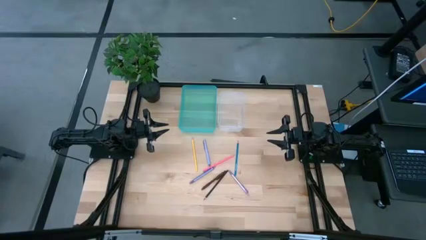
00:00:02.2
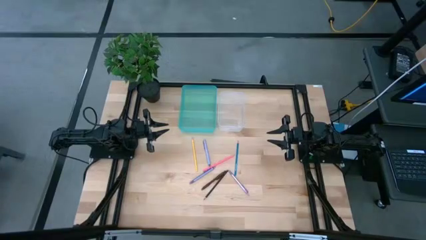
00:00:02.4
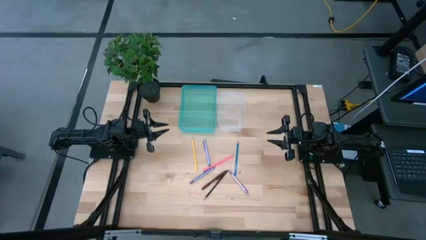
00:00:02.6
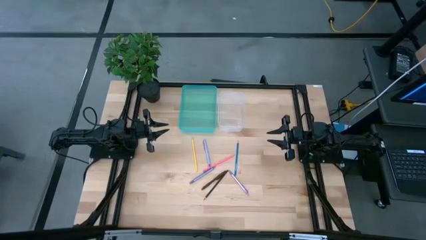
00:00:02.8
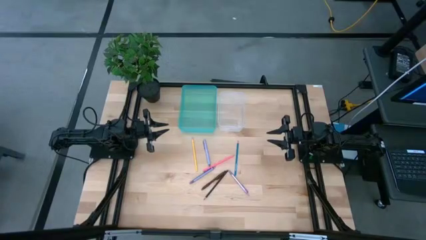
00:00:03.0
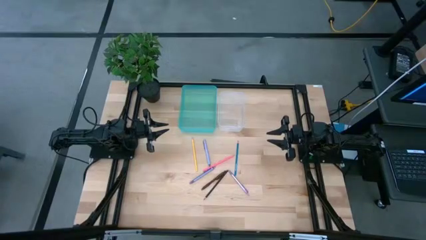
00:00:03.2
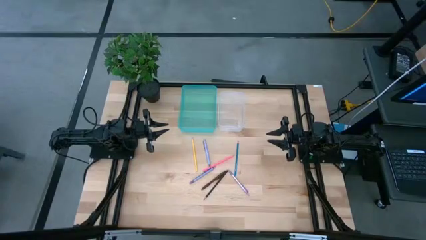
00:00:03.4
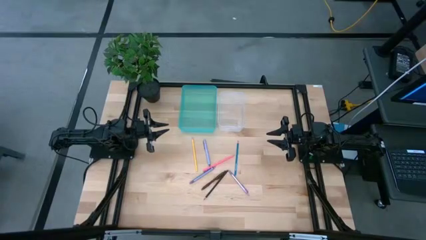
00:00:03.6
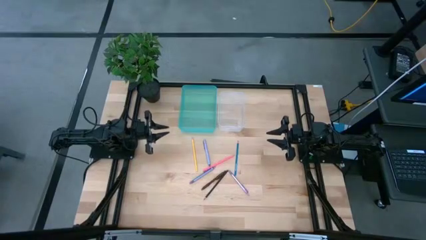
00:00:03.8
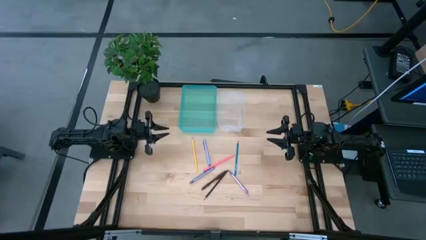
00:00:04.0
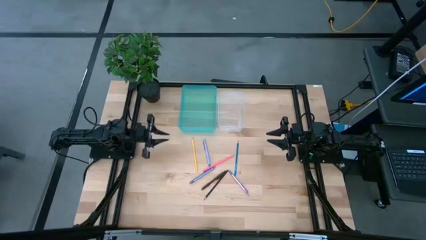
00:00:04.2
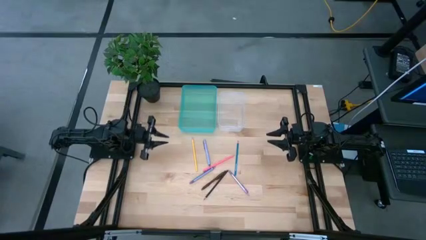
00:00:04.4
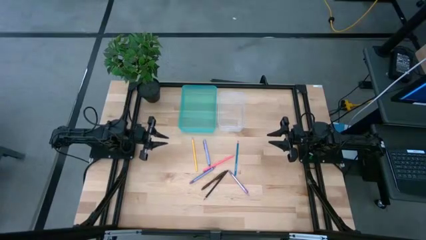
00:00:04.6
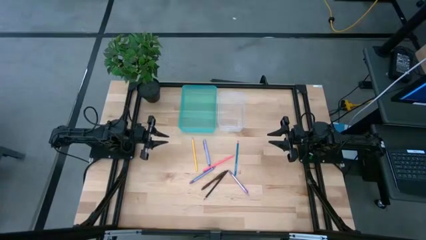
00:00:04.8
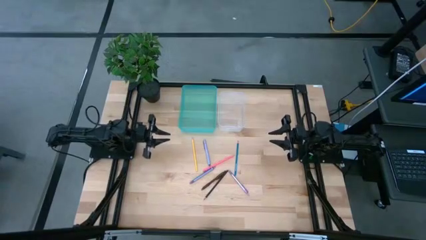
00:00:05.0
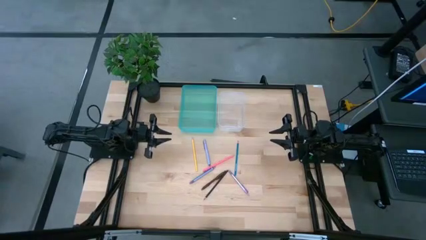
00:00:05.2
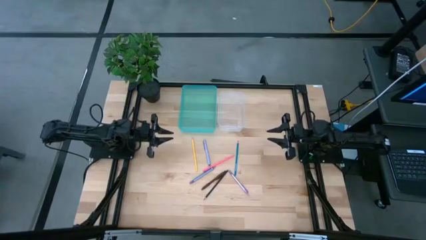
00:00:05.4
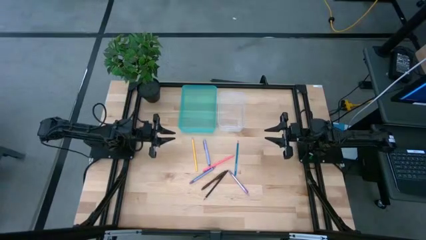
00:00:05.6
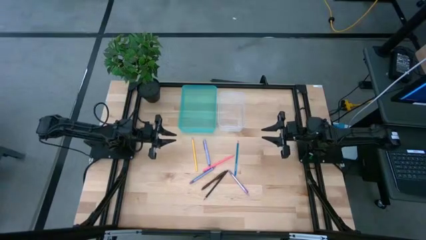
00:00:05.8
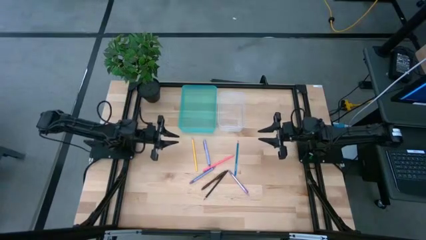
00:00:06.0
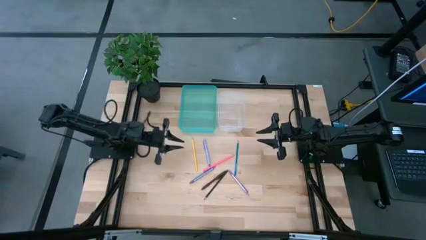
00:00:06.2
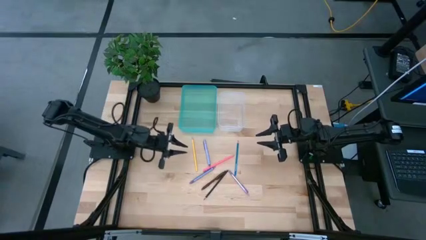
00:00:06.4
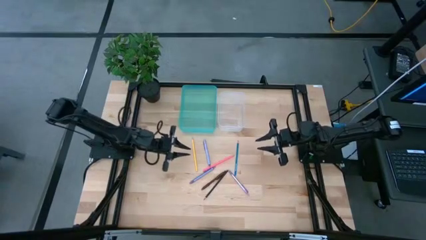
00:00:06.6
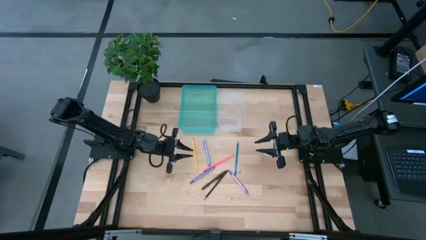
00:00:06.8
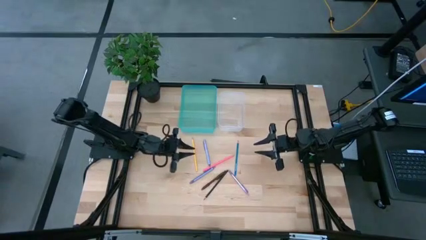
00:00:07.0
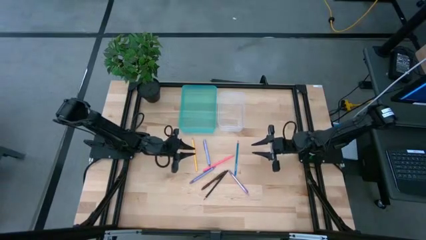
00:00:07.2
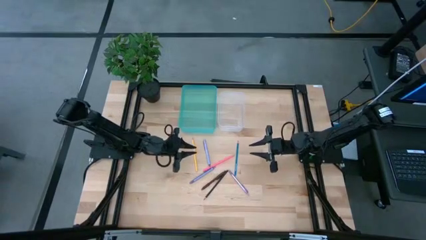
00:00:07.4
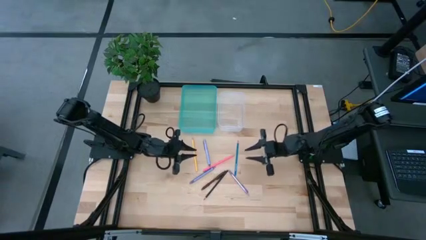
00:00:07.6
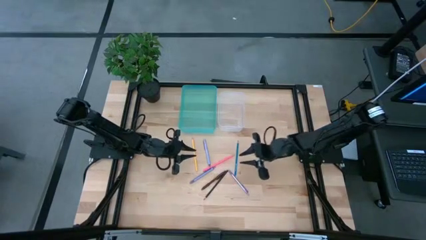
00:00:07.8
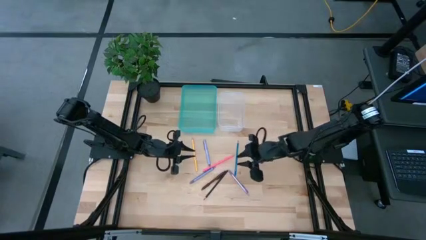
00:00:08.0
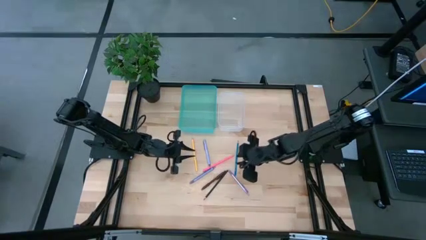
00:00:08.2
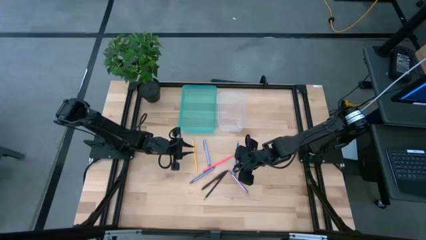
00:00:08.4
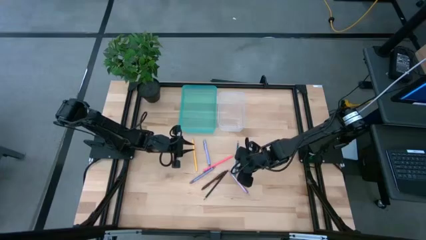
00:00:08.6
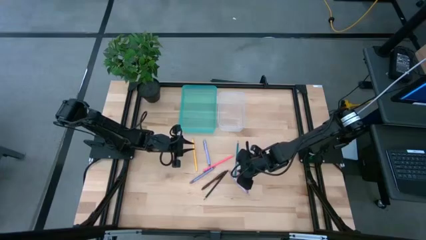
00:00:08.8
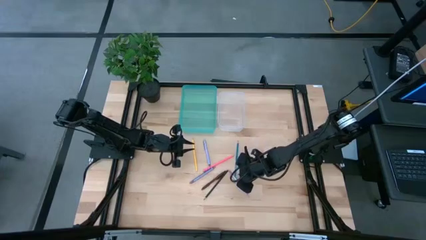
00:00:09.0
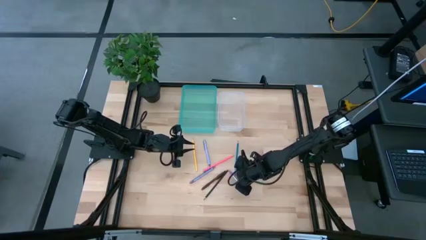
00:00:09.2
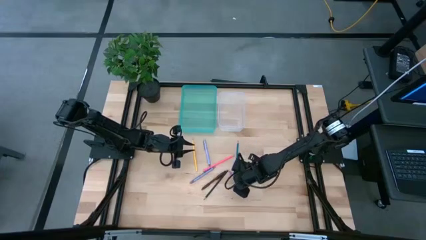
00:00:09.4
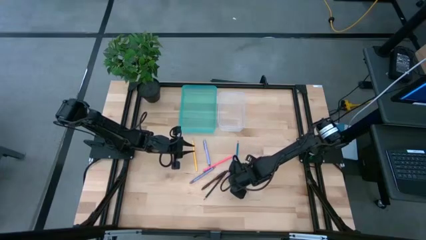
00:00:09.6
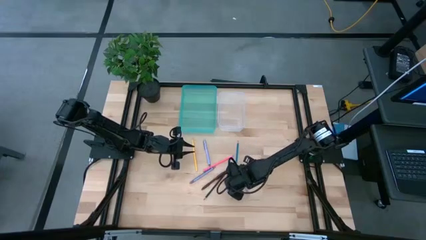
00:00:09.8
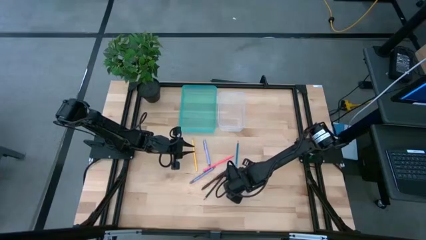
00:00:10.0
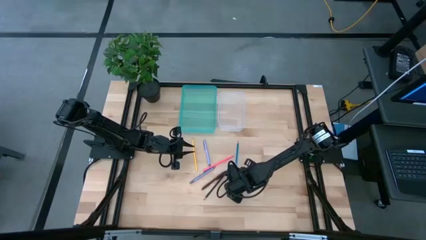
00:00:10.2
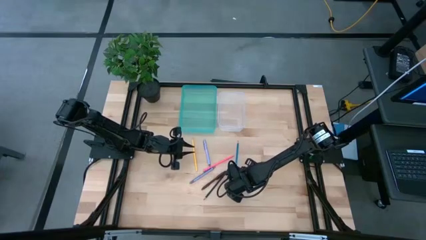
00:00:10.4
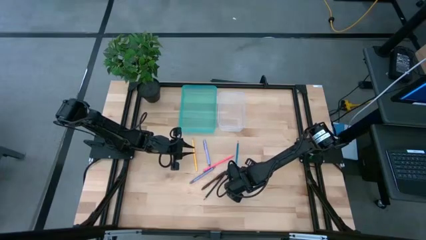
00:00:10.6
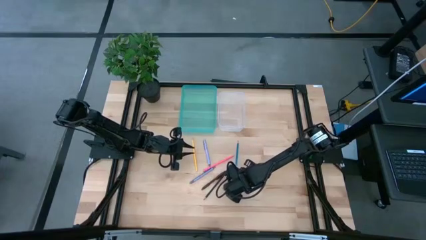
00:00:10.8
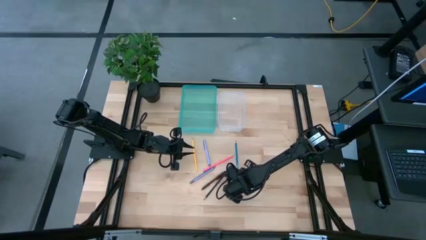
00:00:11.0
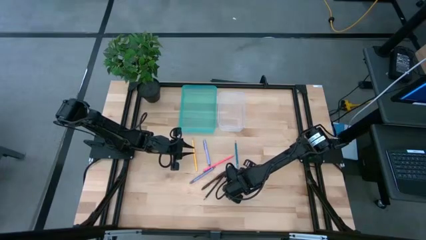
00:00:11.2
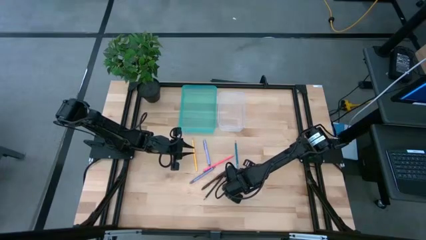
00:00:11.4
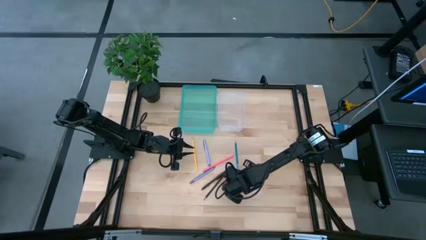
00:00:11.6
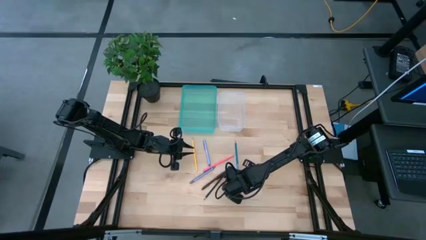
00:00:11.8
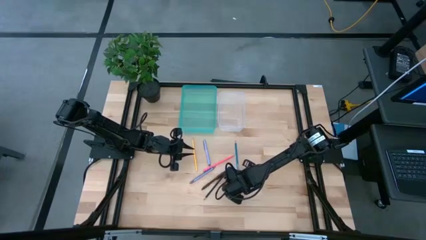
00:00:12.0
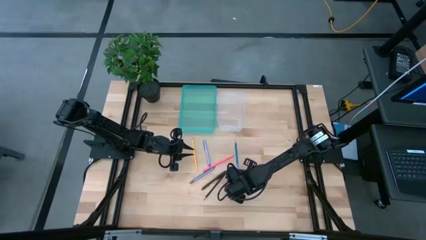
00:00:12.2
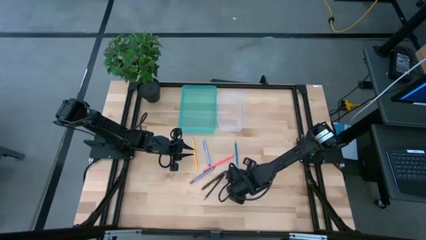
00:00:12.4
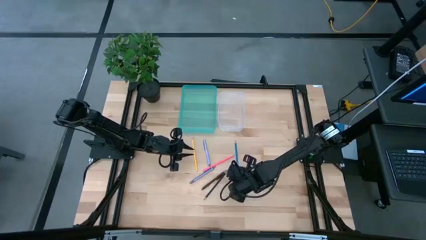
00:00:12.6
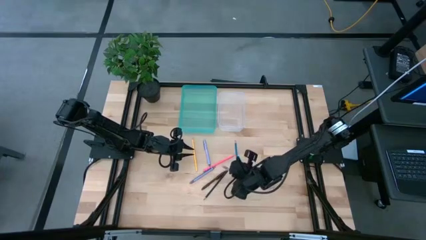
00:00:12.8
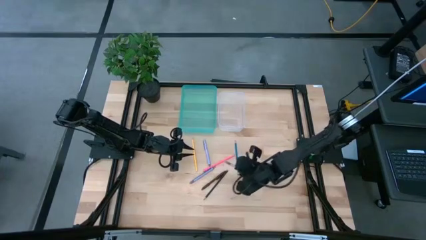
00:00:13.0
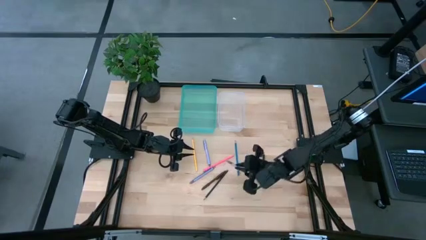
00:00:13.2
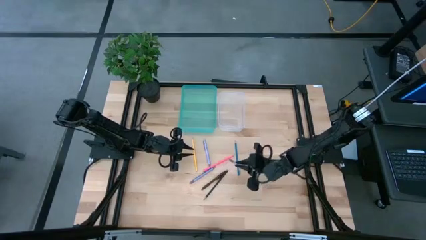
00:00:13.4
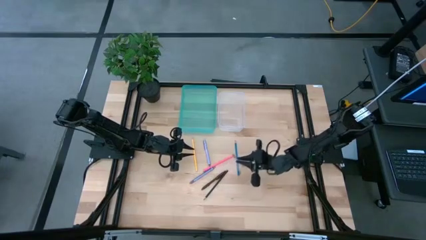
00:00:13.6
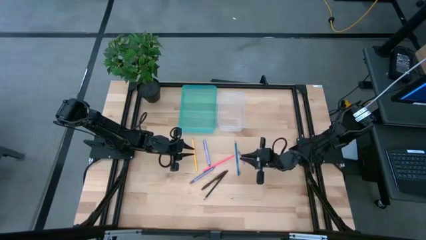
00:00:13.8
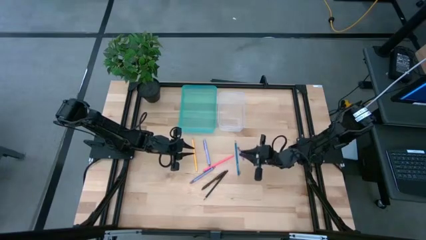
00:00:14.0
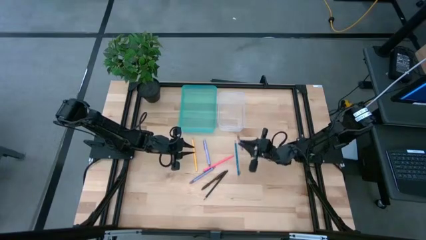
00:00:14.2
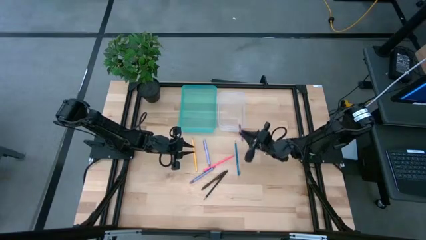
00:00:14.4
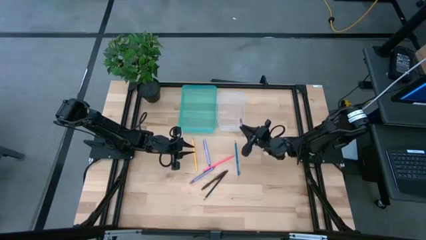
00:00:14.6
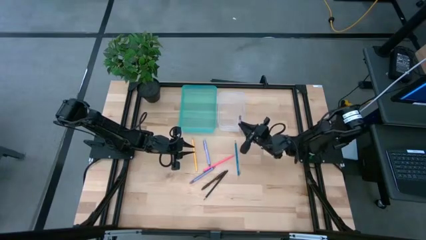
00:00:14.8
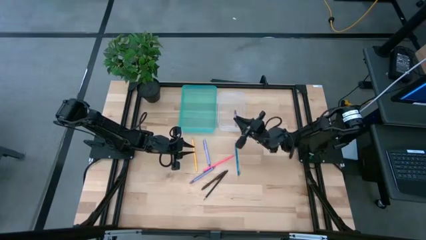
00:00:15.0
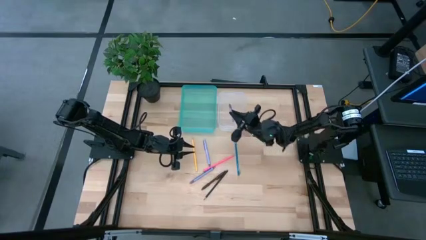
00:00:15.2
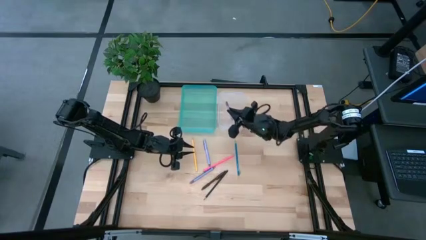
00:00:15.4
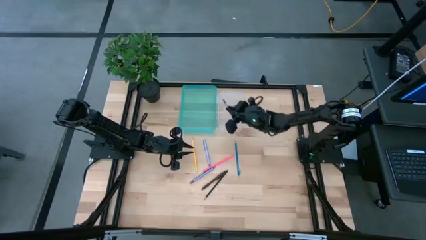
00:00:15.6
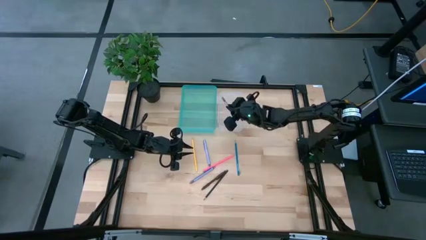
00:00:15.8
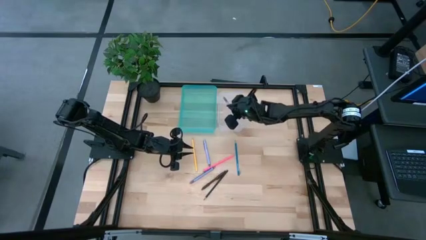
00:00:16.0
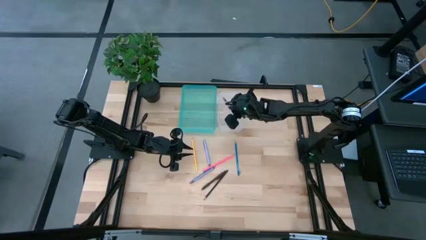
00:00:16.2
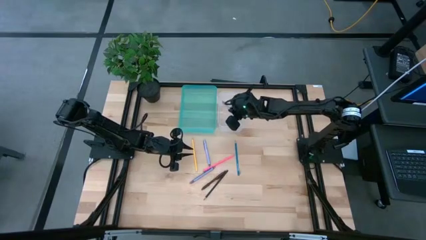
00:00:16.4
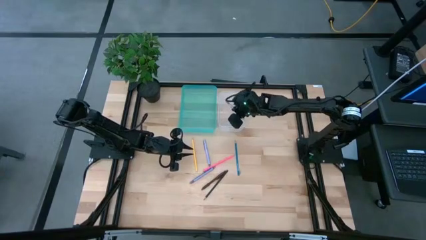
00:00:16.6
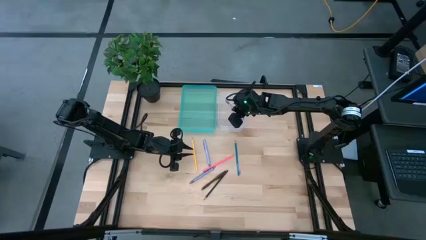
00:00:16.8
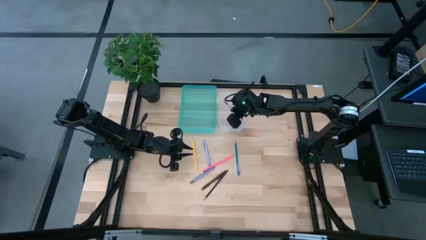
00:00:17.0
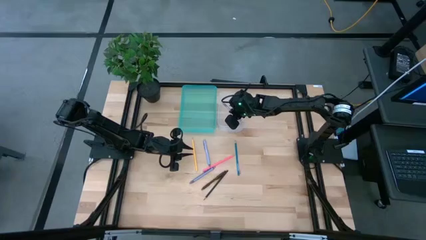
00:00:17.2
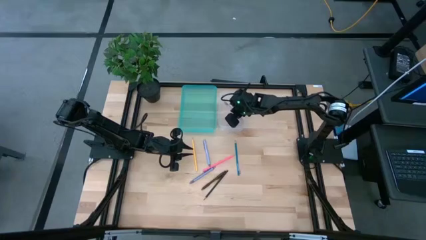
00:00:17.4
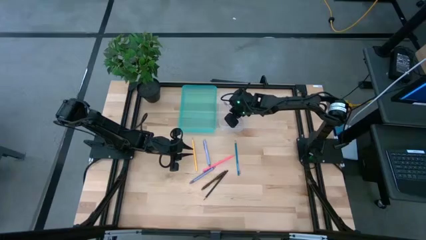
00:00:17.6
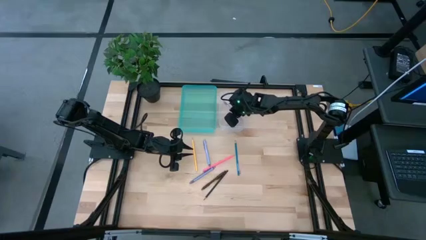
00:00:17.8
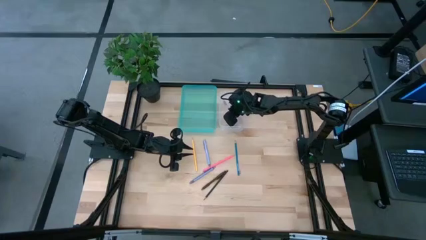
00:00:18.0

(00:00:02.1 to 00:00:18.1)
Task: Sort pens & pencils
Put the bottom purple pen into the transparent bin
